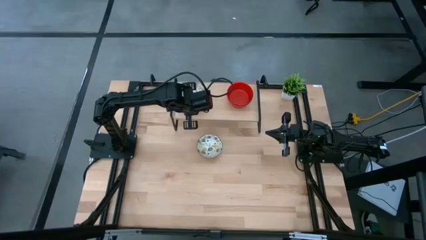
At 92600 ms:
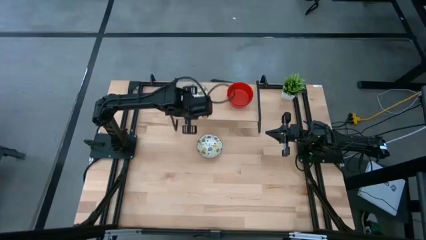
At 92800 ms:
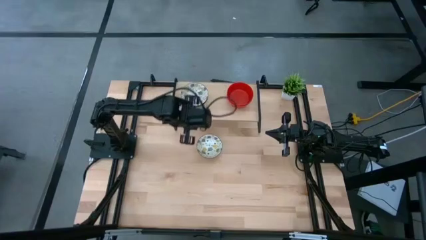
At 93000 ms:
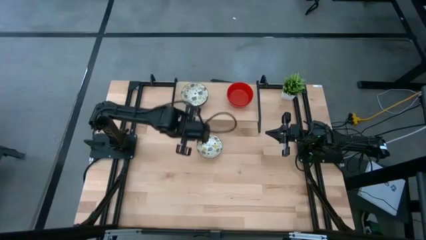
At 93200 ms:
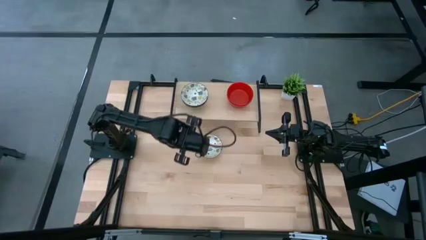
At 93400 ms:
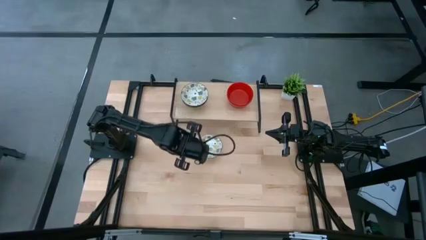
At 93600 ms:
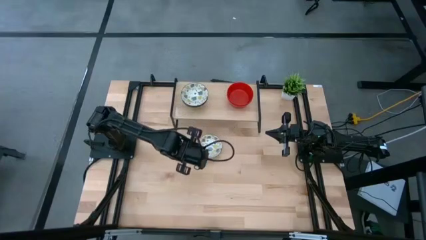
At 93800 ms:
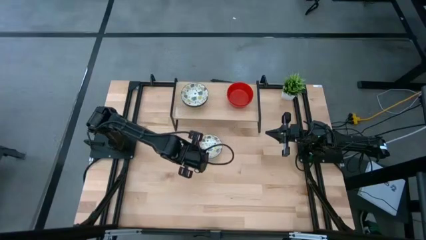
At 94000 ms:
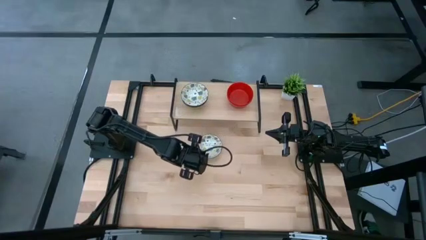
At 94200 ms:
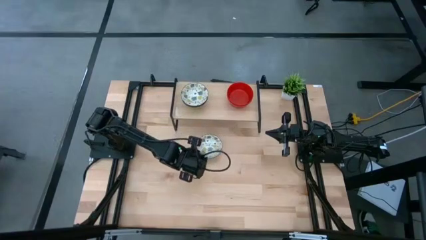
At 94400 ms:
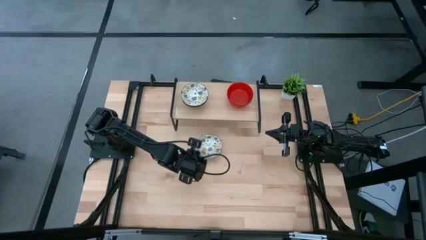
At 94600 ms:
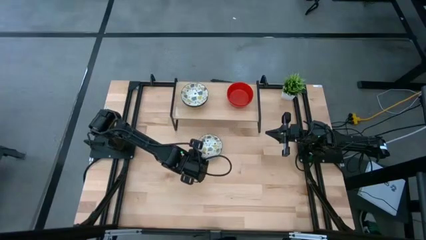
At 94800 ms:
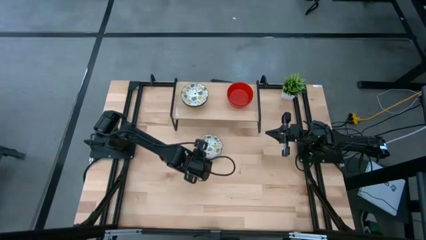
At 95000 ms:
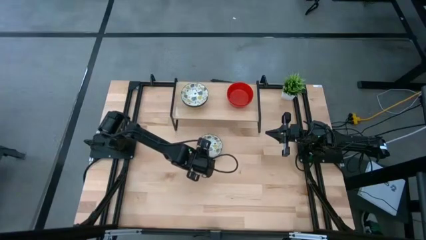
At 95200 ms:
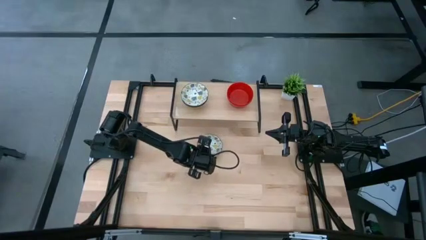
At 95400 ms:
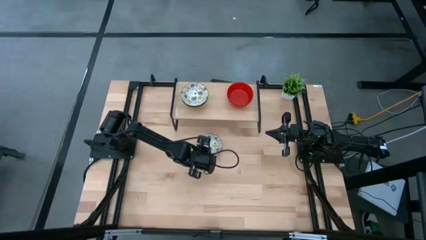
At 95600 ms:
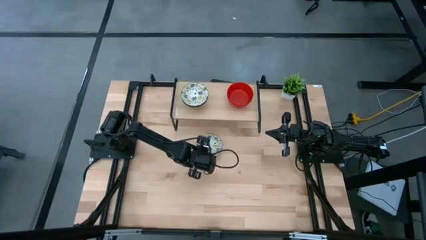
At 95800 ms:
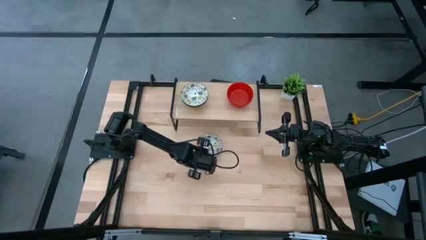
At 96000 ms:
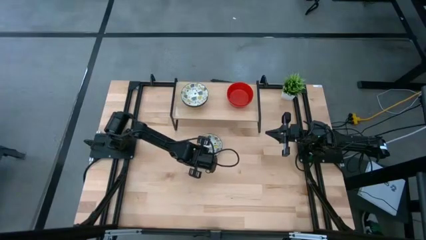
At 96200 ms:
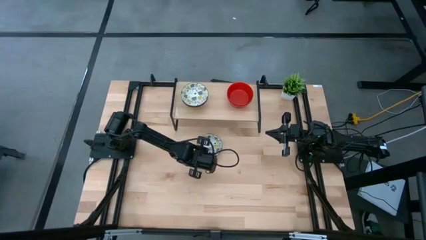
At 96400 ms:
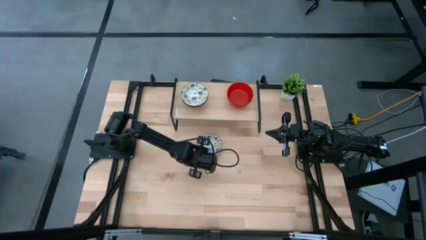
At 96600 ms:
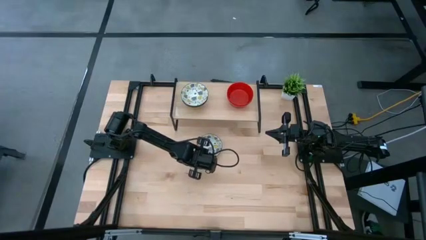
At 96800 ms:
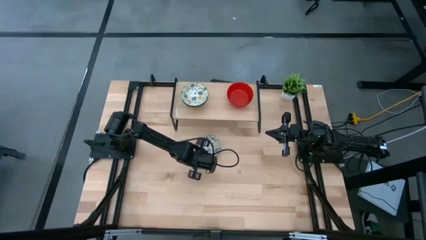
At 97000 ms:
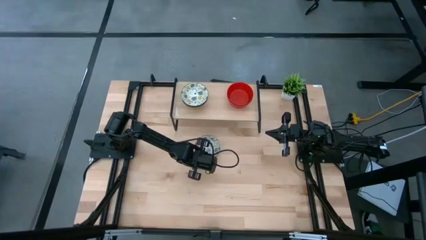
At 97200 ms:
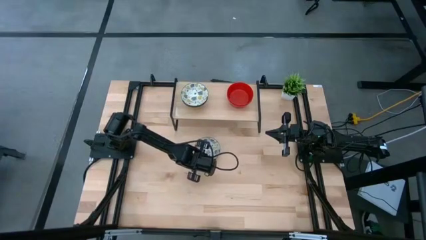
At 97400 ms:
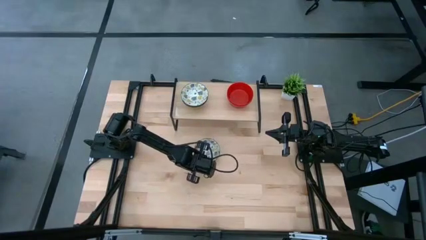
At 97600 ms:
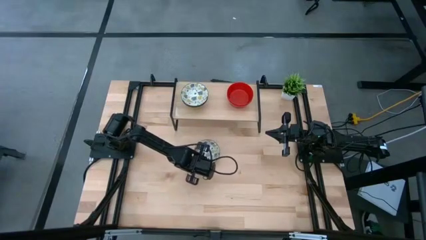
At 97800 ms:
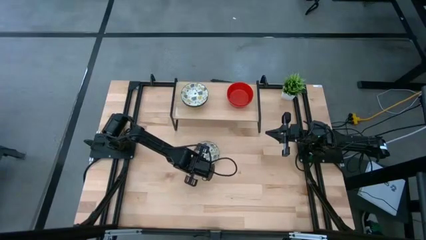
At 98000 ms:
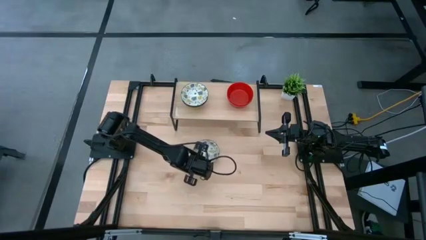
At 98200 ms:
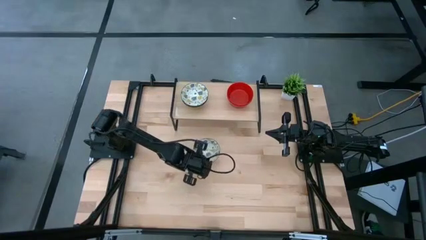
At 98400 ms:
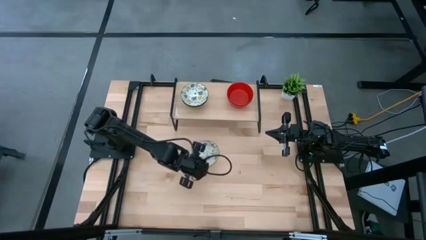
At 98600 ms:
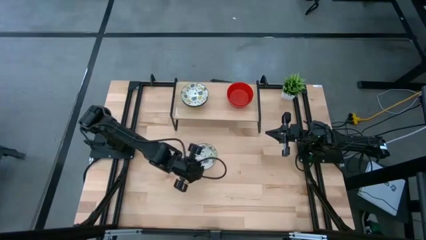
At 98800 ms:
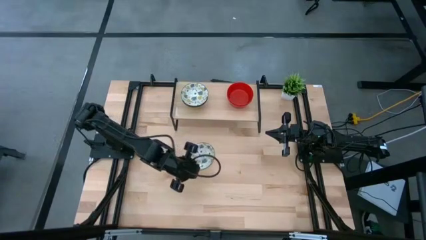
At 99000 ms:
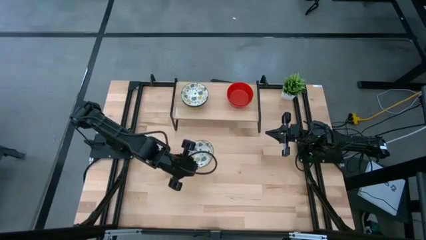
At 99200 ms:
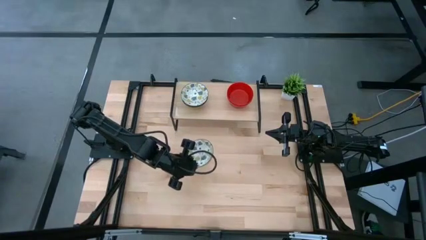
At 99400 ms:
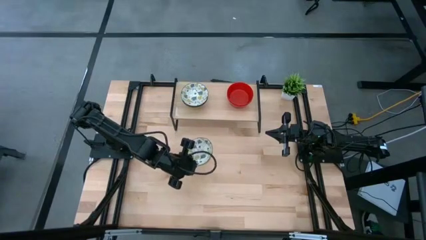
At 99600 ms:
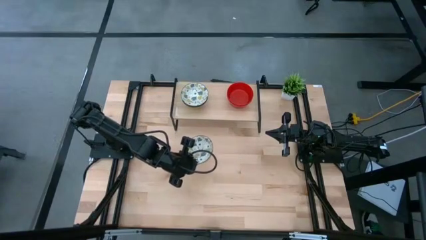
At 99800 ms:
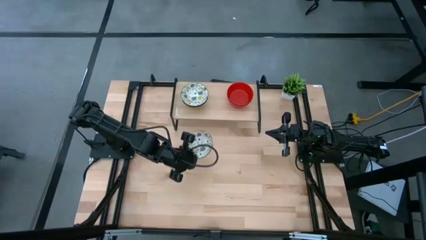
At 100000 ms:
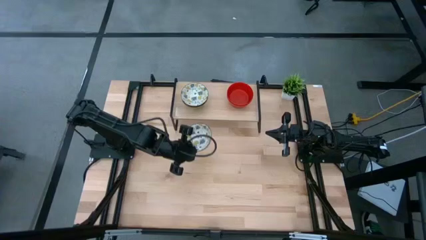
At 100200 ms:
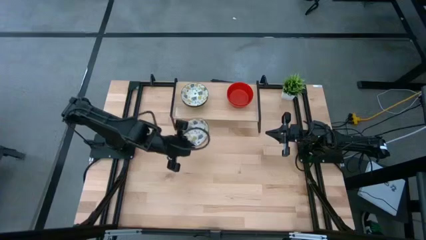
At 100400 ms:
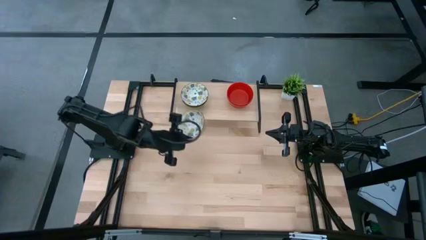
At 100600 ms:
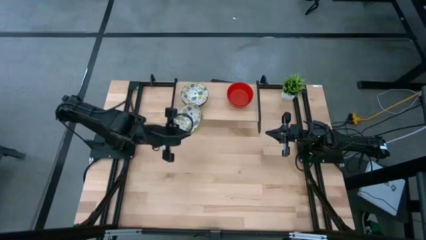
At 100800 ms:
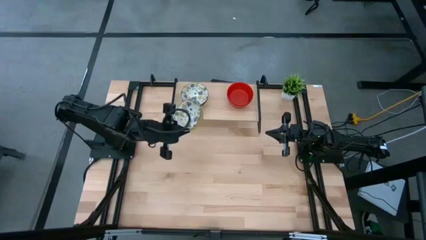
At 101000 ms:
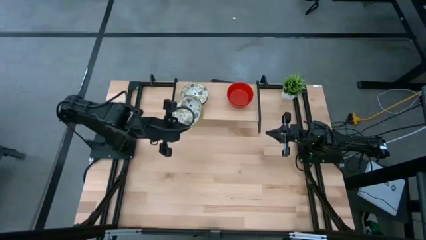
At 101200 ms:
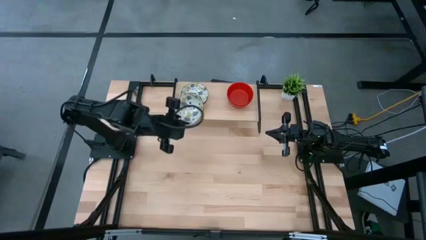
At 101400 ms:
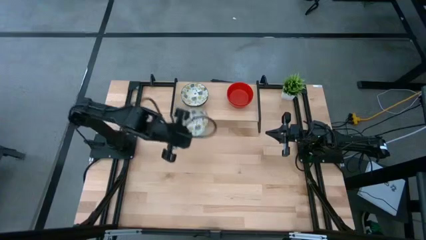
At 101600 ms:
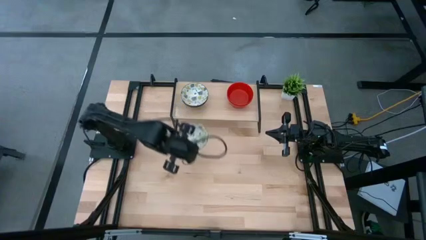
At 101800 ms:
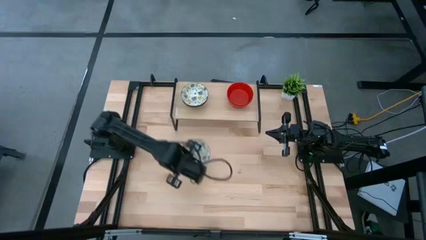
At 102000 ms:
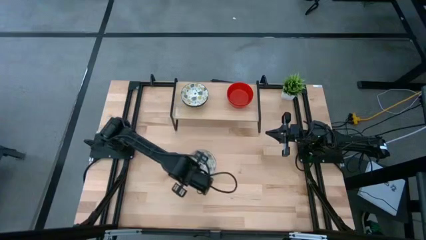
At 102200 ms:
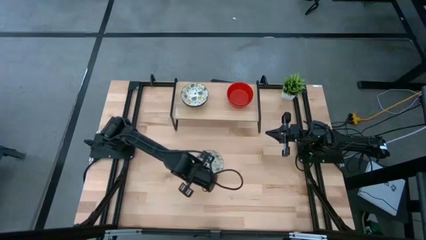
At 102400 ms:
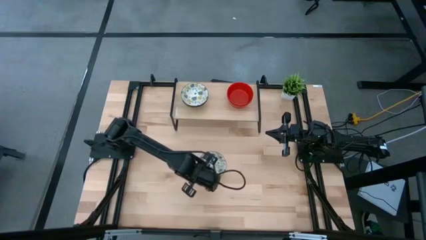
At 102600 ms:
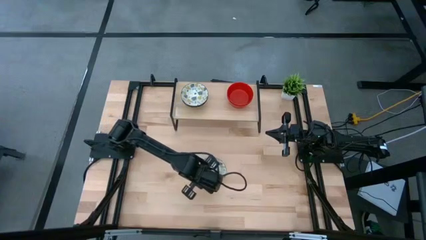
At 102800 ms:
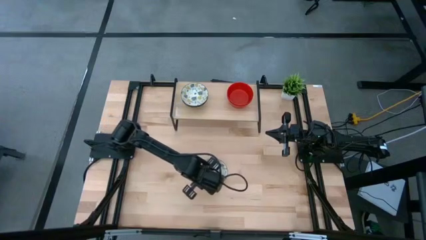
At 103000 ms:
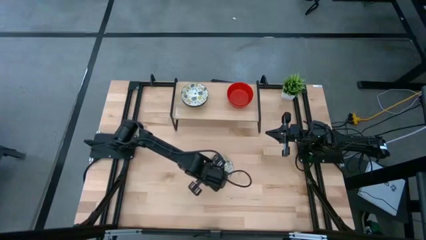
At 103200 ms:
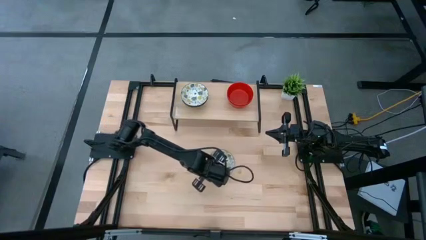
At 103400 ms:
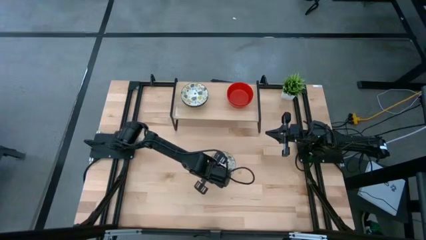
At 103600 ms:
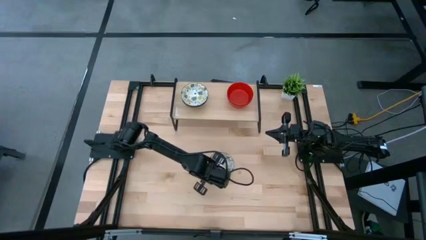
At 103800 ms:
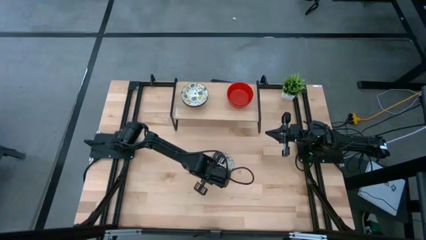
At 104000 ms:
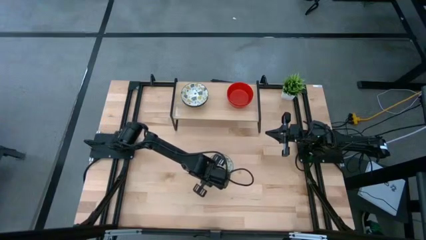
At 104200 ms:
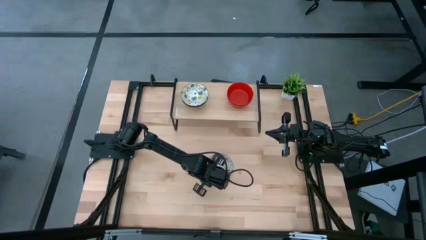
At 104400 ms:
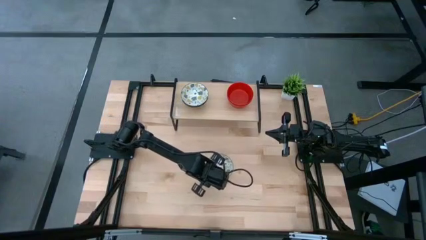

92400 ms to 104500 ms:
Task: Pick & Place Mini bowls
Stack the white patterned bowl on top of the white patterned bowls on the shelf

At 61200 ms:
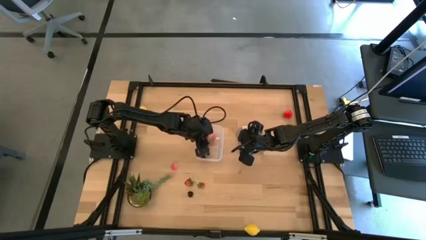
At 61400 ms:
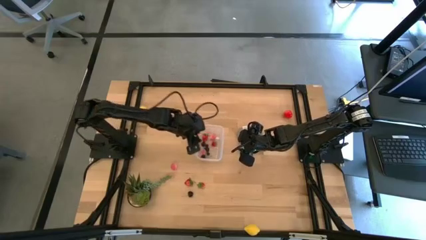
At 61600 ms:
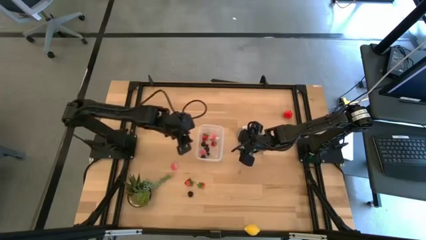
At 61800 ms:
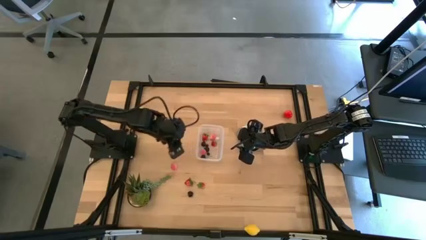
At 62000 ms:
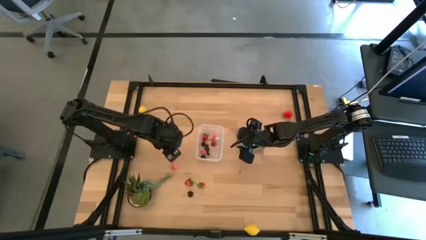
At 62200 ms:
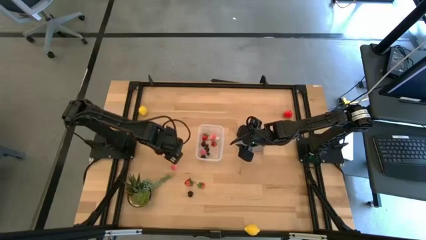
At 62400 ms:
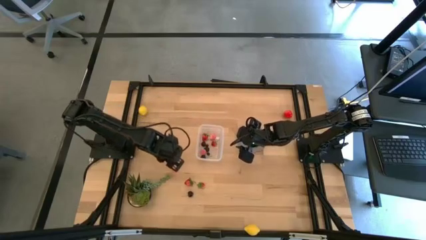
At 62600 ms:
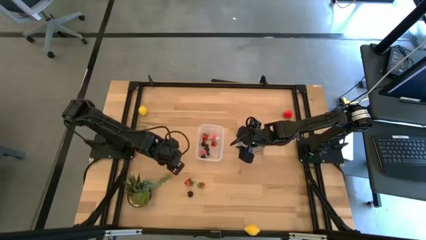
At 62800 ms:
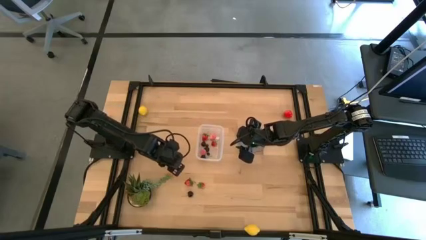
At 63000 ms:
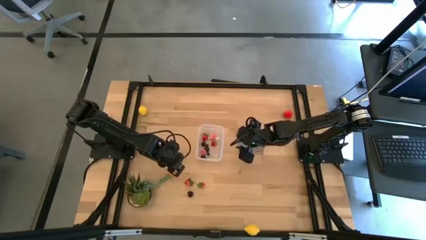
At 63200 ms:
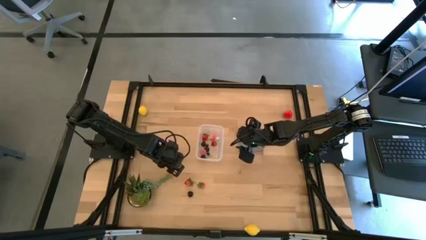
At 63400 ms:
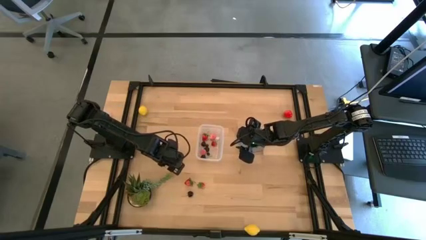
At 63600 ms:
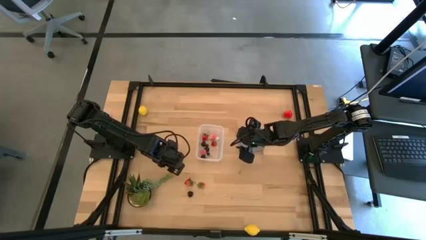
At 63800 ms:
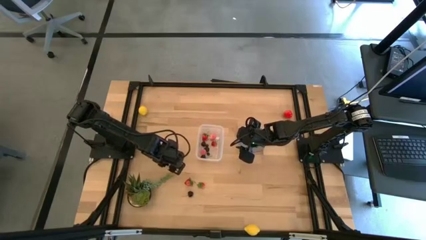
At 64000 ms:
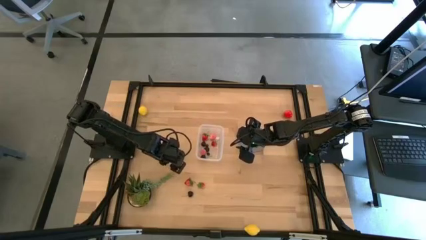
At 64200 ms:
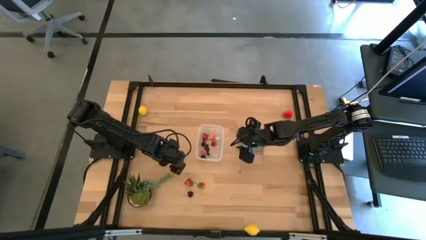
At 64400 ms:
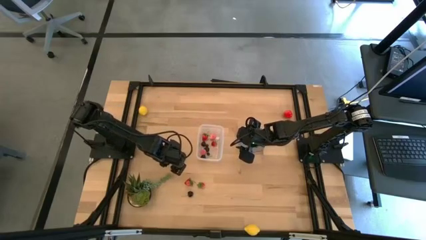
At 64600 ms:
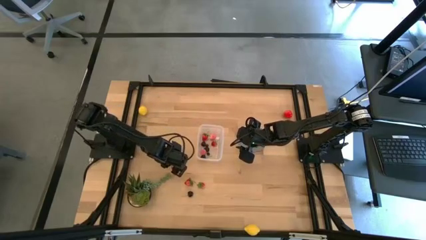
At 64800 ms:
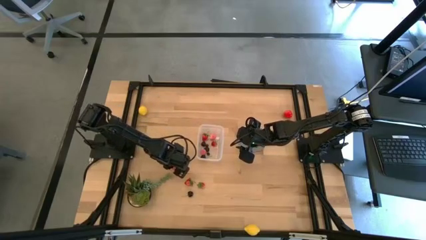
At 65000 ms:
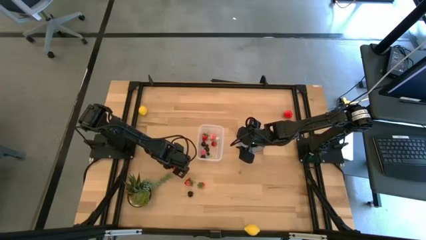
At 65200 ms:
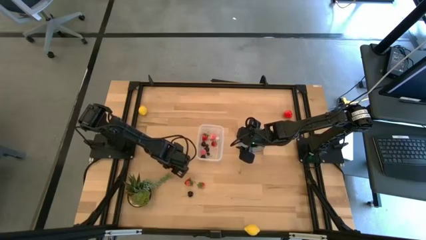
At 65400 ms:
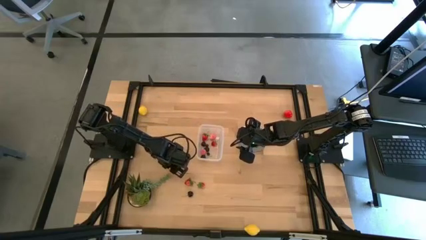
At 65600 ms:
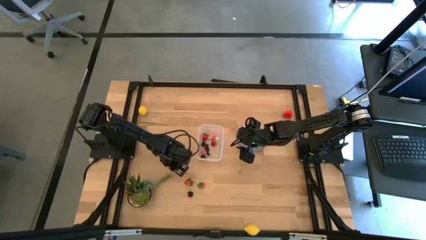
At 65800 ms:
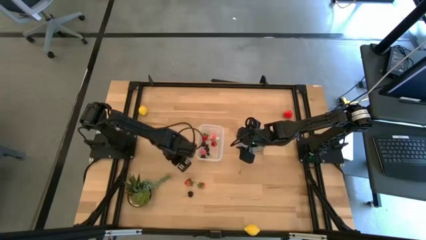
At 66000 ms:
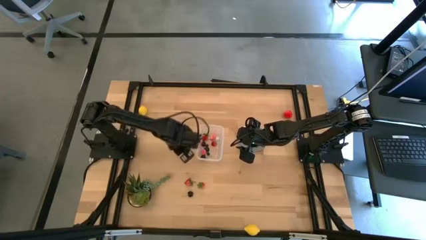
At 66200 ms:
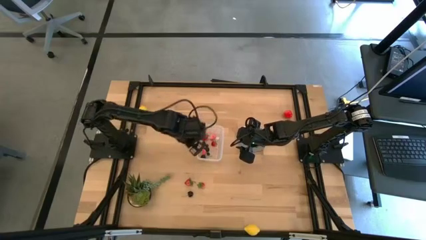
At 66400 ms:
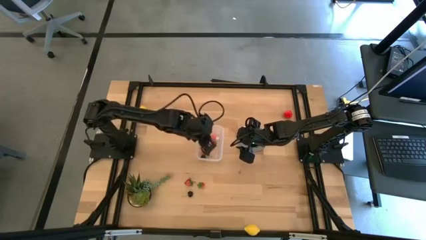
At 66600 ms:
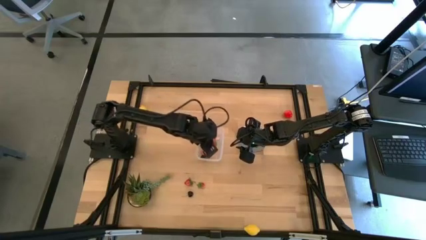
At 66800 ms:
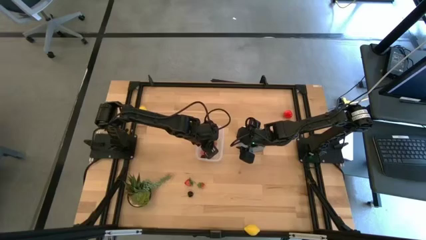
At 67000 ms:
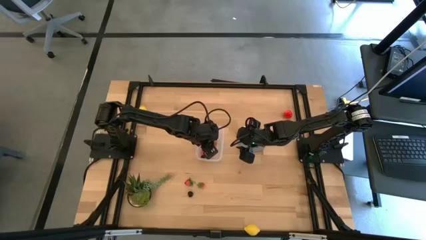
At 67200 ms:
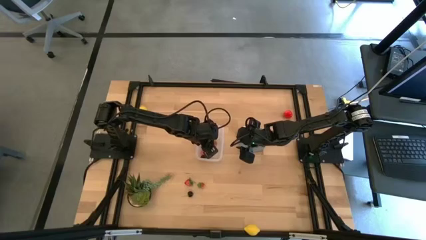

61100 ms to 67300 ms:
Task: Pick and placing Produce into tupperware
Put the peach into the transparent bin
